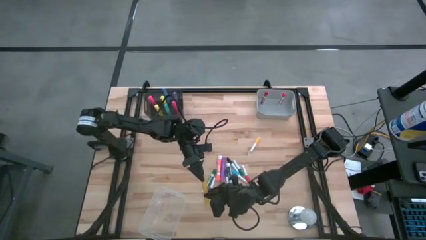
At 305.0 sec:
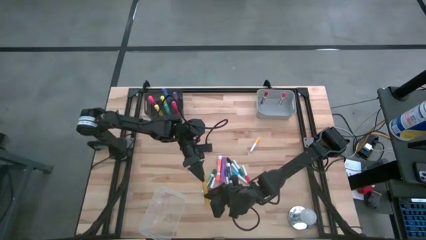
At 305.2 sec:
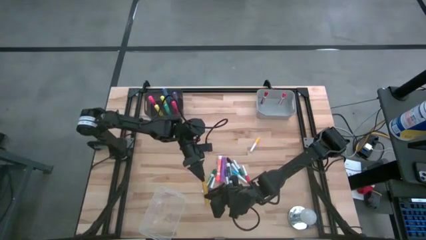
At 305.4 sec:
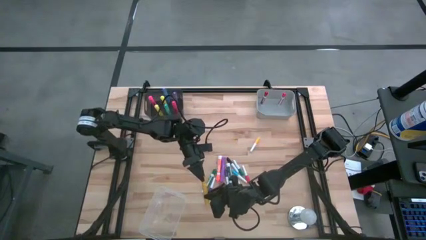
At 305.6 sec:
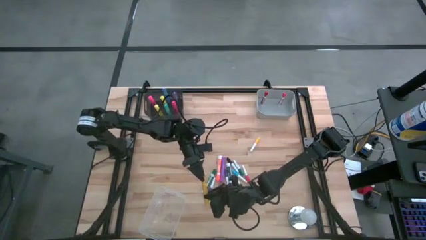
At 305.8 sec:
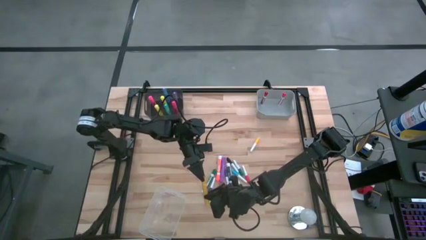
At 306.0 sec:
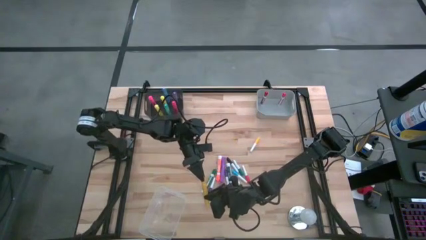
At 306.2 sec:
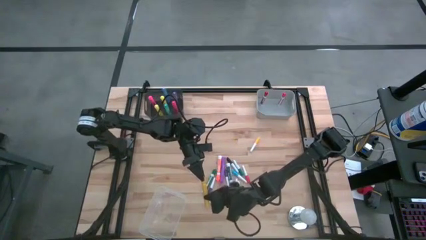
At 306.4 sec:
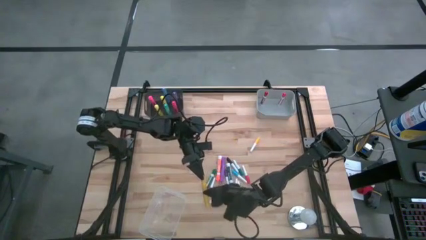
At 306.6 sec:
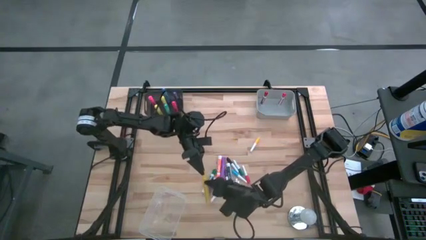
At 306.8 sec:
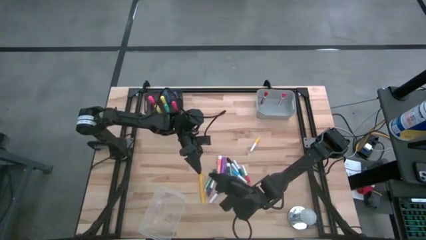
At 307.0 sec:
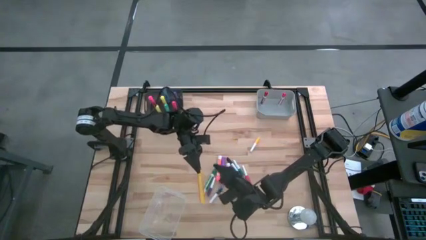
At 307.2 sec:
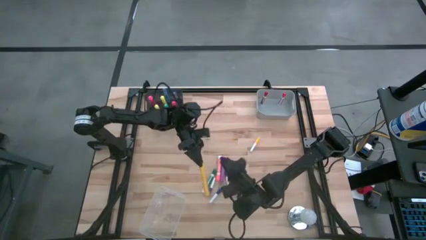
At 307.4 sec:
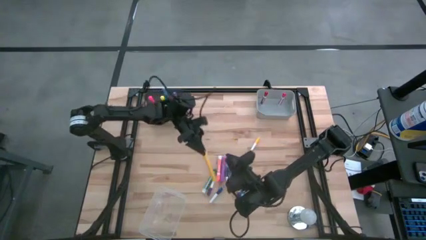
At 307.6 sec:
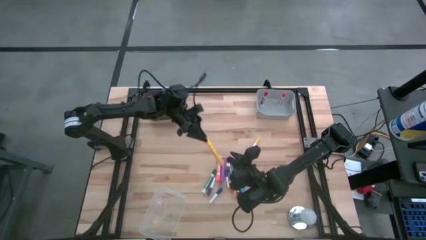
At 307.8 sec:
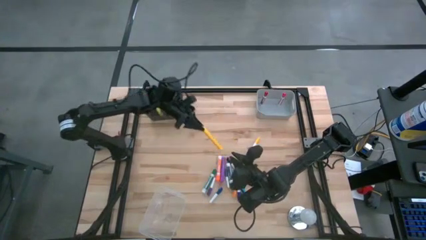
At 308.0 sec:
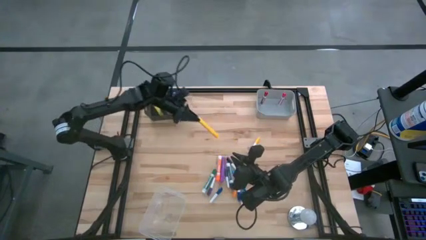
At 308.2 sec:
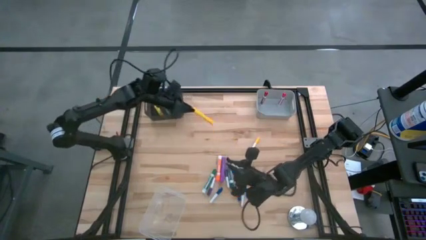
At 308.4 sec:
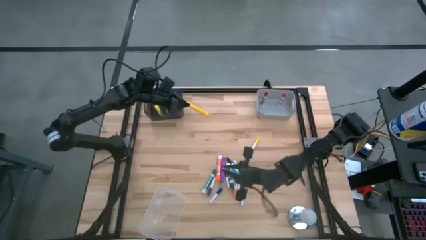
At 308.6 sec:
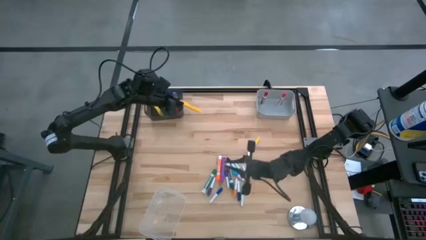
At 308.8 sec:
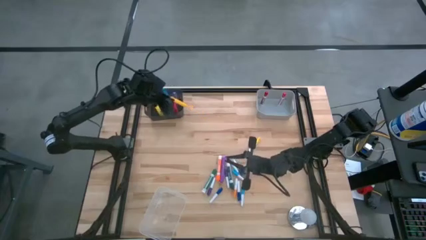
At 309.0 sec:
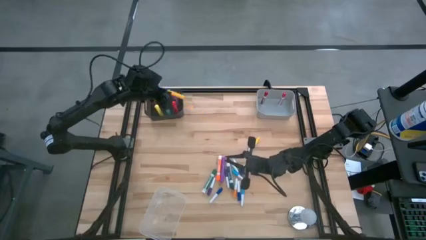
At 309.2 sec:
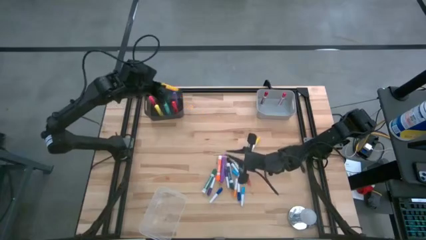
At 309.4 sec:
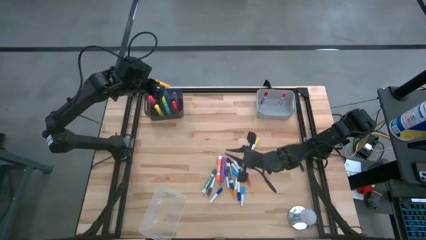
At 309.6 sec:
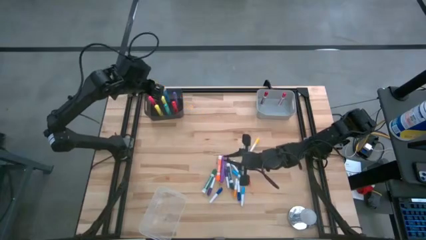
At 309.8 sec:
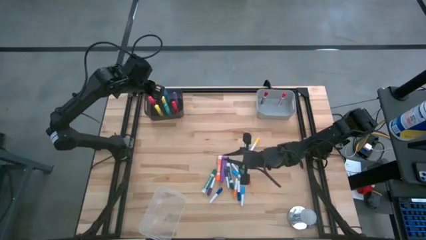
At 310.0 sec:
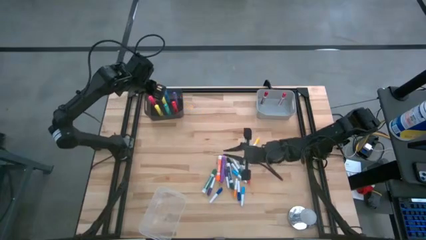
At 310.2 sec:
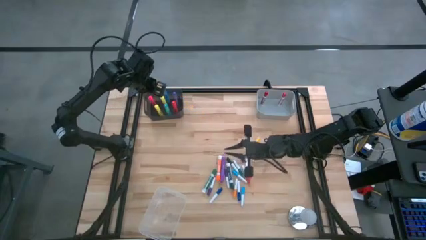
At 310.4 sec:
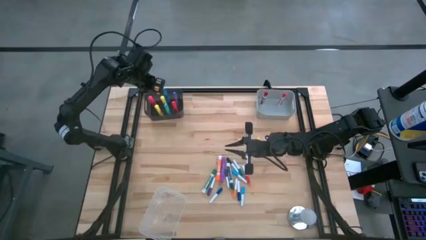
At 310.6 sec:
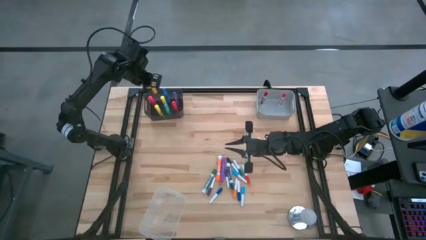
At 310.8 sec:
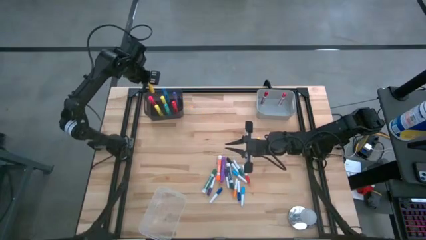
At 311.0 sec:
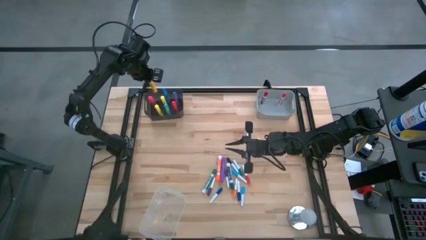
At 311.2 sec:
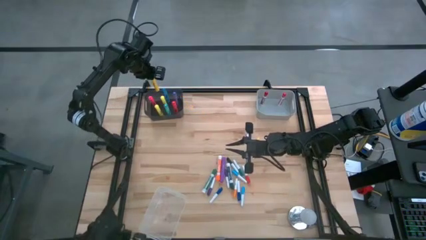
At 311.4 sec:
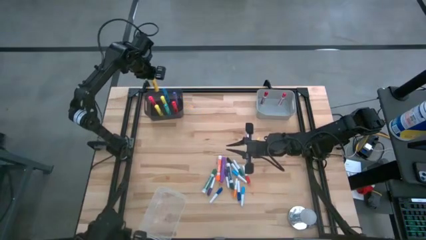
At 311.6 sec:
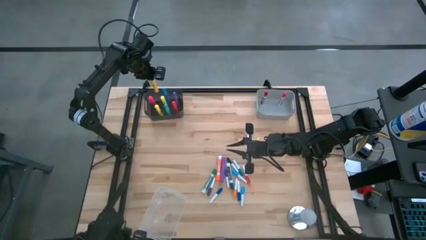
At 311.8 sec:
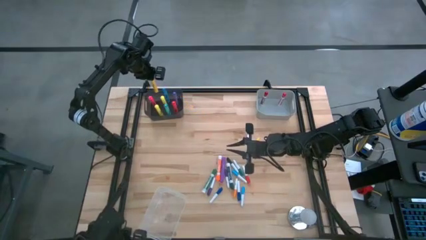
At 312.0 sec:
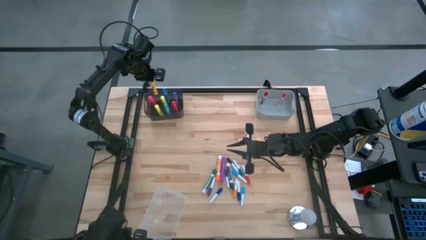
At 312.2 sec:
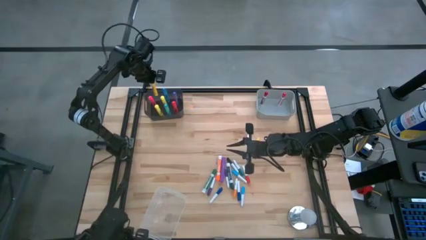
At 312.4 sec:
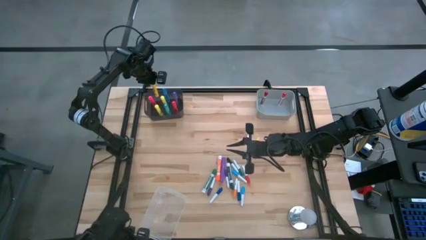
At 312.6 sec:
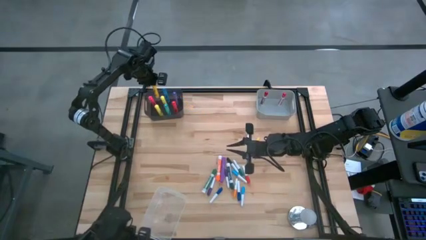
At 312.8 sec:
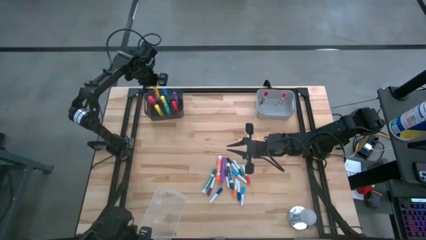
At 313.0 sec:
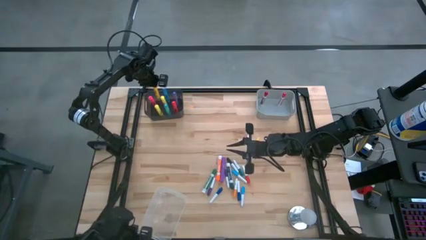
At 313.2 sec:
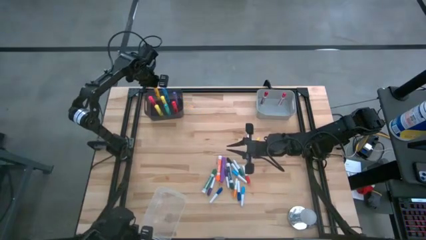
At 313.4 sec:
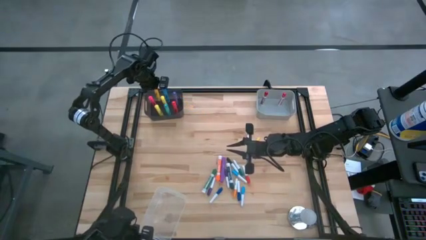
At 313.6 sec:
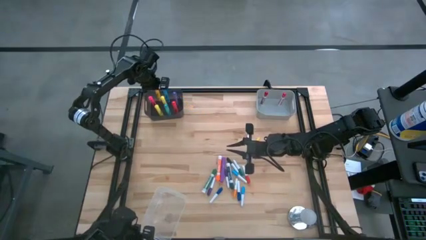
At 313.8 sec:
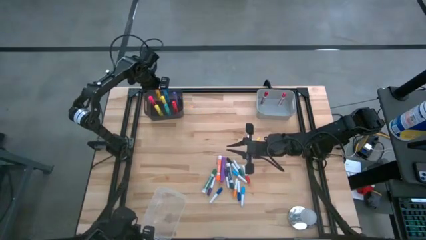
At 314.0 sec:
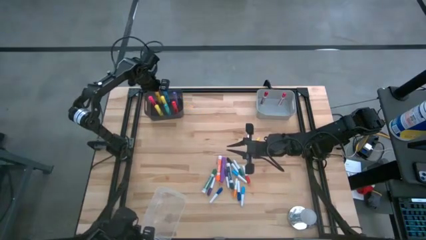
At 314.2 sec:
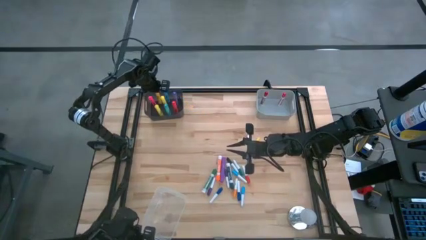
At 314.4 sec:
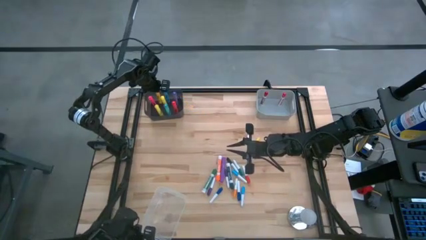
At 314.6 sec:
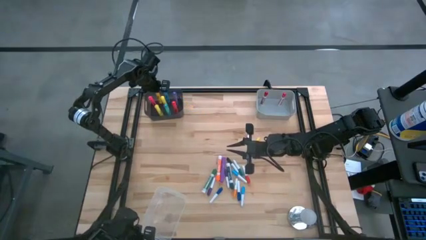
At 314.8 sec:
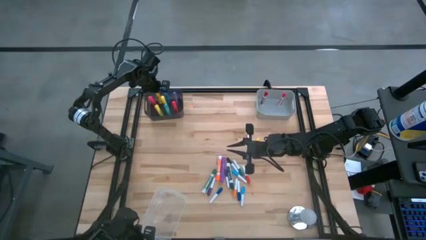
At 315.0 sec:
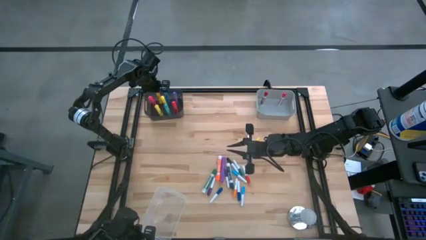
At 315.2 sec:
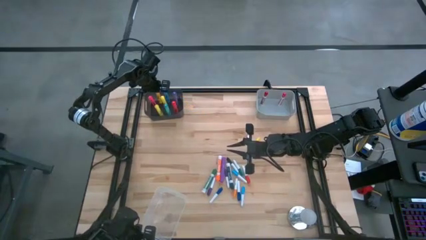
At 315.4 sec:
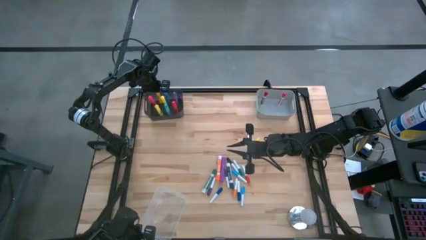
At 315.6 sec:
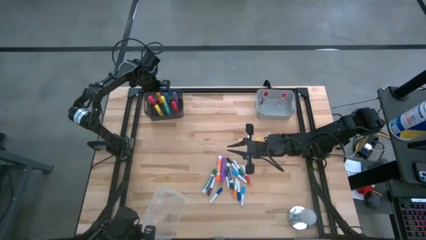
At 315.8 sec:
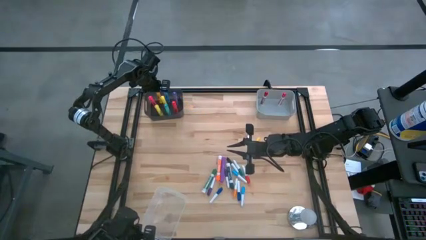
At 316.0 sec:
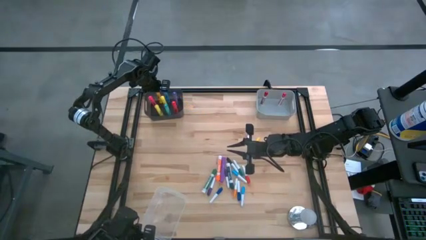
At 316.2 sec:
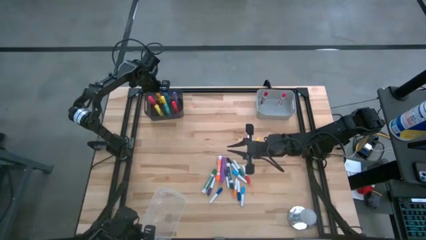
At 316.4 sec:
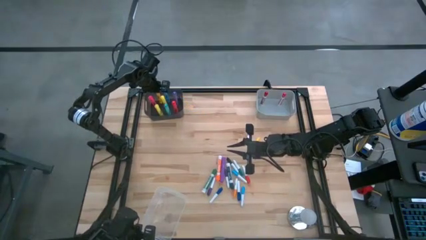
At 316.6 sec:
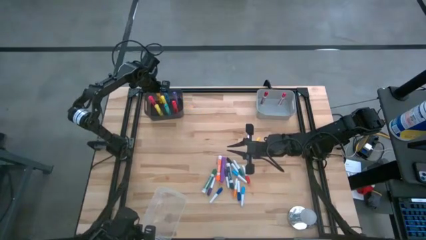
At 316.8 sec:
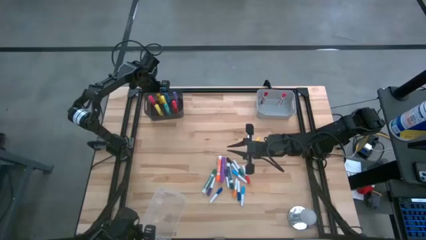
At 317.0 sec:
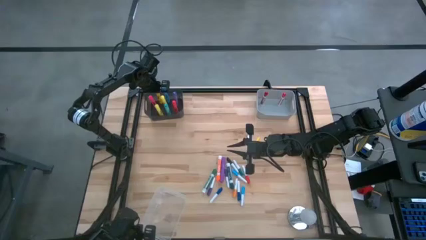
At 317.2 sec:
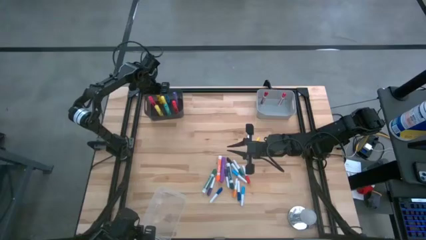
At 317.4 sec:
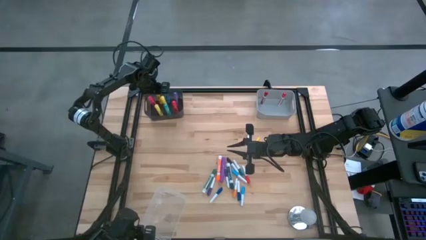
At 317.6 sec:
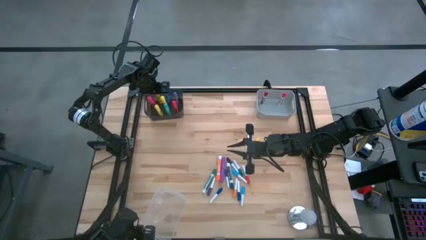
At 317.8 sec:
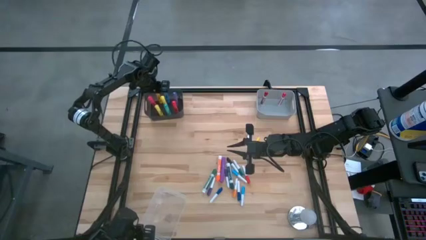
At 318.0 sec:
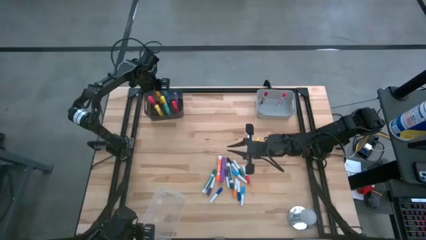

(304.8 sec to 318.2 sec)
Task: Pick & Place Markers
Put the dark yellow highlighter pen into the black bin

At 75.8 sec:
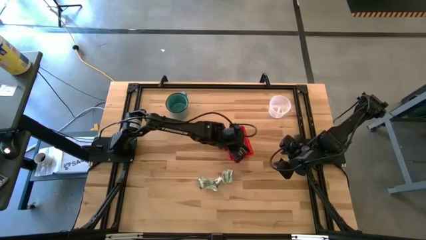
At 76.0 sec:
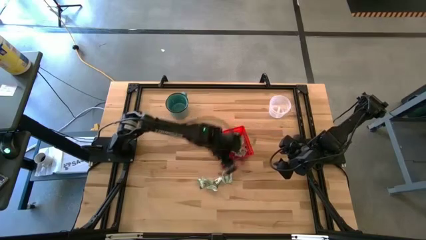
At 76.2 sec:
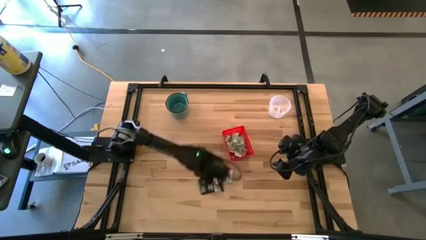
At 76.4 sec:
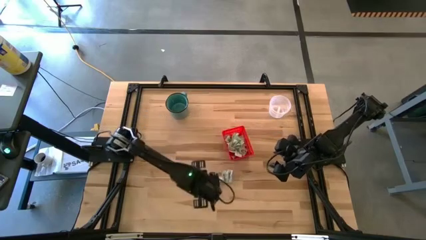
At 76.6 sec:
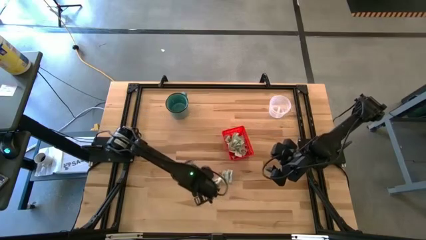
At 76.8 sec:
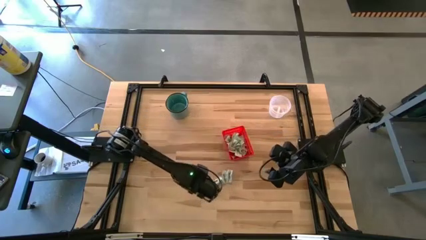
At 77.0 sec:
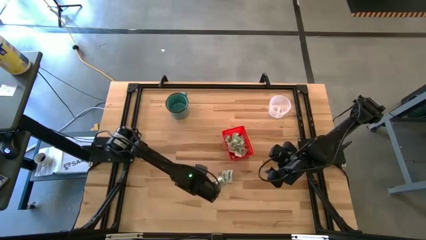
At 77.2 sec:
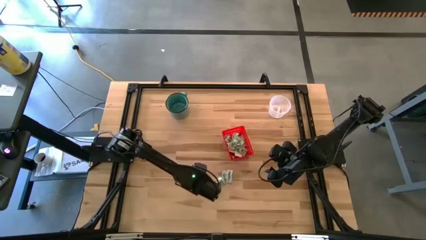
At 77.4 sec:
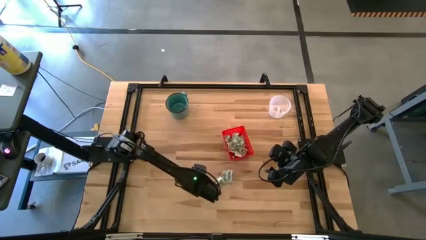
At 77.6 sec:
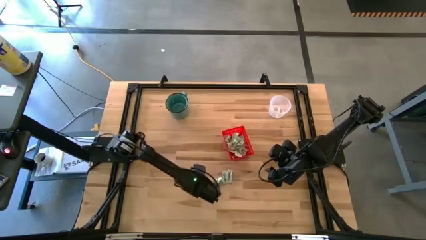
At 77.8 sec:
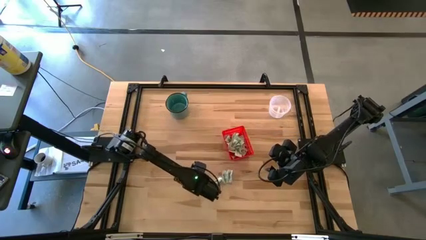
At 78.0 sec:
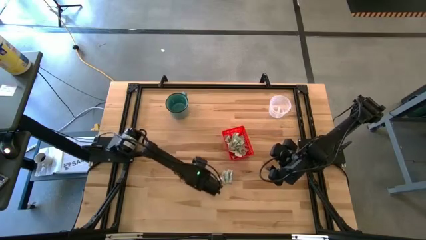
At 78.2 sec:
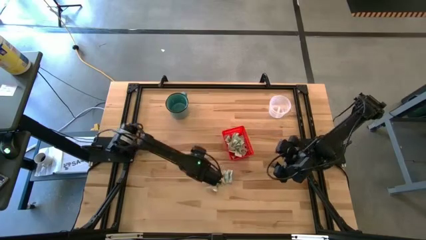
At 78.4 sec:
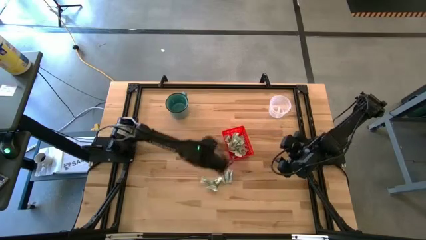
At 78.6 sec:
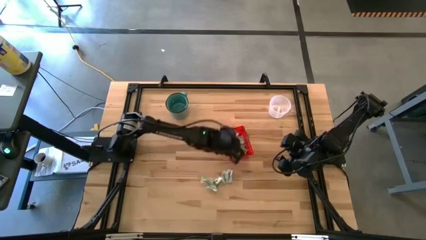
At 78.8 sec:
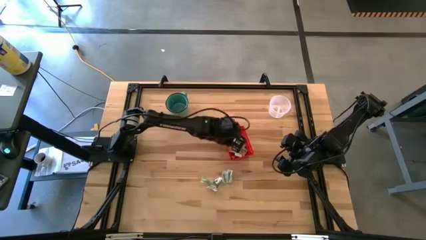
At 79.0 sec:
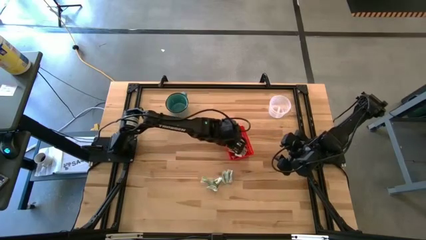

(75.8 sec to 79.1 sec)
Task: Pick and place items into bin
Put the truvia packet into the orange bin
